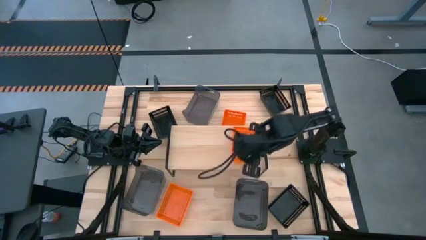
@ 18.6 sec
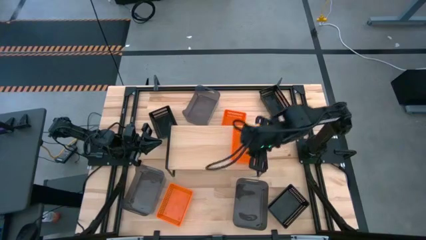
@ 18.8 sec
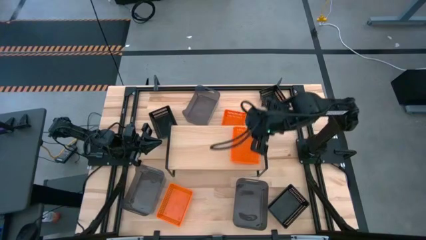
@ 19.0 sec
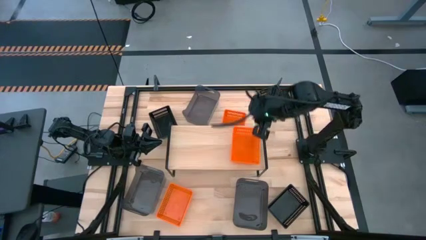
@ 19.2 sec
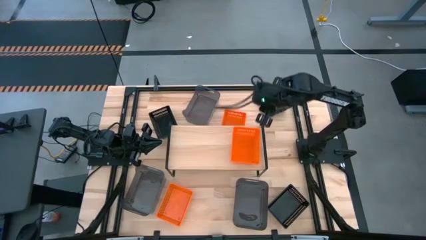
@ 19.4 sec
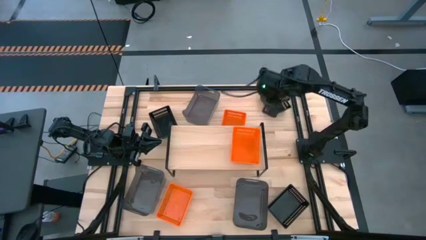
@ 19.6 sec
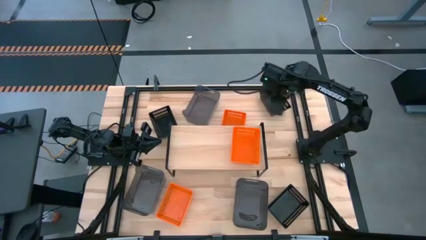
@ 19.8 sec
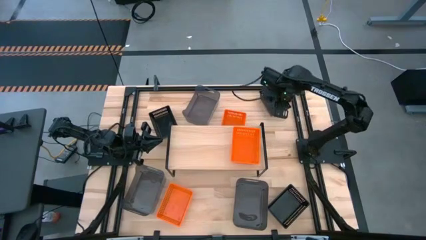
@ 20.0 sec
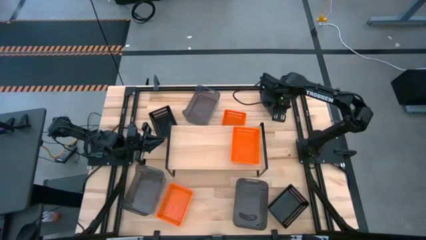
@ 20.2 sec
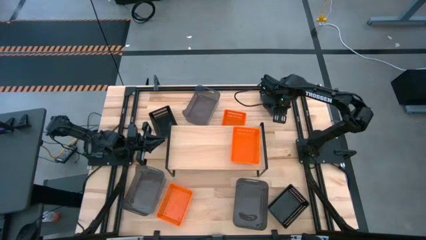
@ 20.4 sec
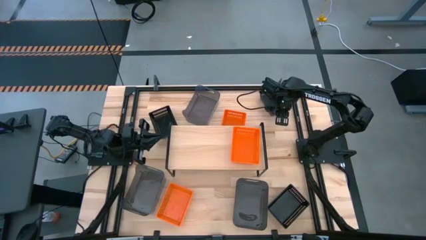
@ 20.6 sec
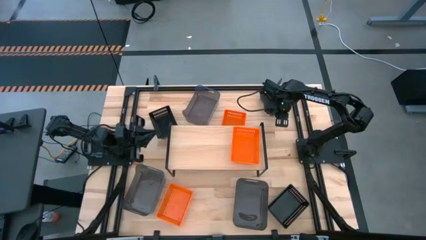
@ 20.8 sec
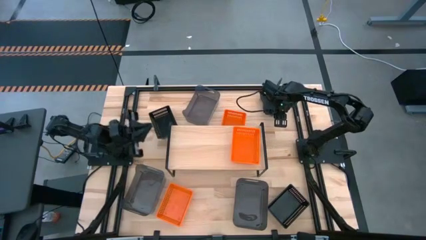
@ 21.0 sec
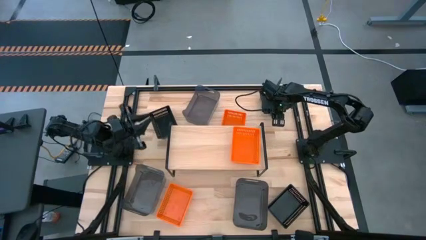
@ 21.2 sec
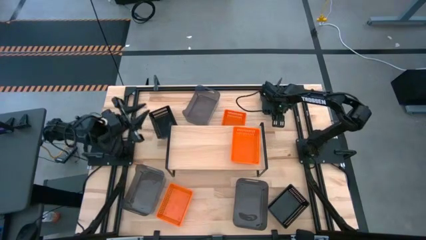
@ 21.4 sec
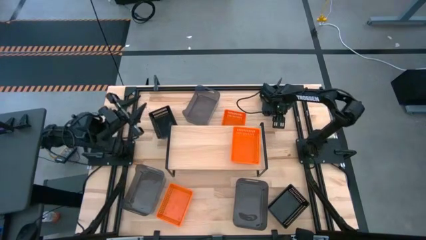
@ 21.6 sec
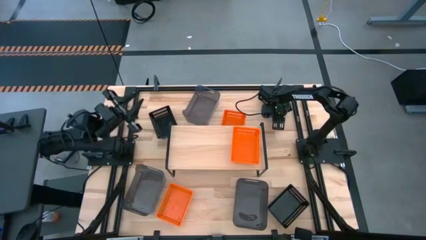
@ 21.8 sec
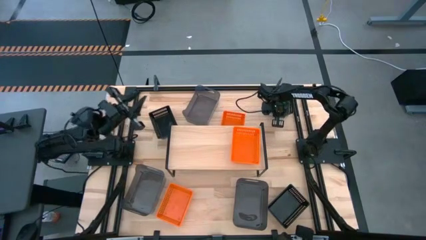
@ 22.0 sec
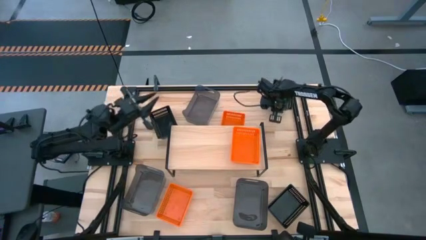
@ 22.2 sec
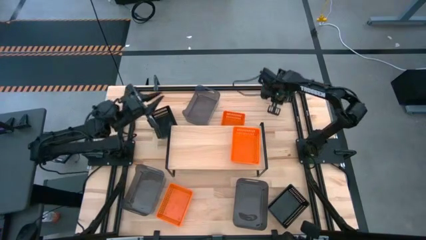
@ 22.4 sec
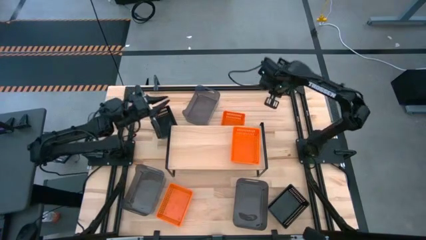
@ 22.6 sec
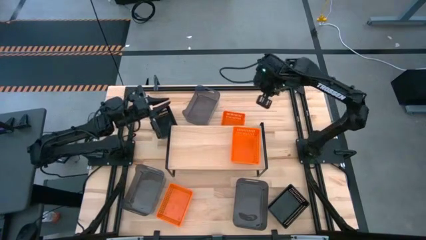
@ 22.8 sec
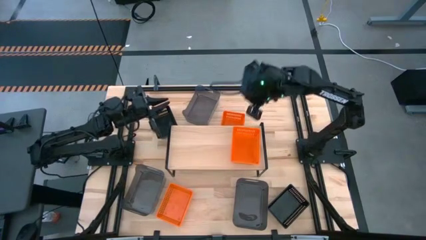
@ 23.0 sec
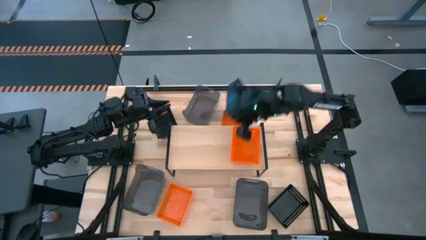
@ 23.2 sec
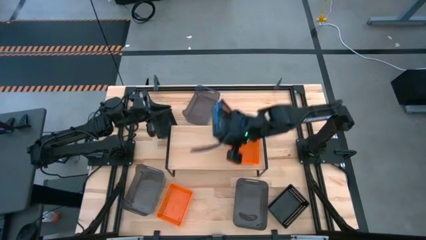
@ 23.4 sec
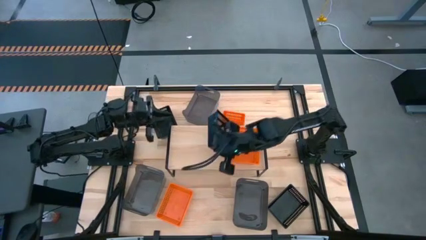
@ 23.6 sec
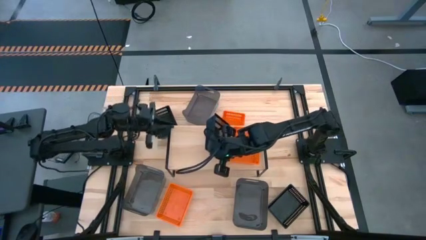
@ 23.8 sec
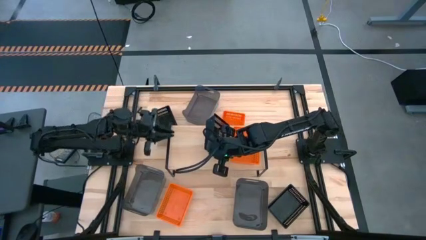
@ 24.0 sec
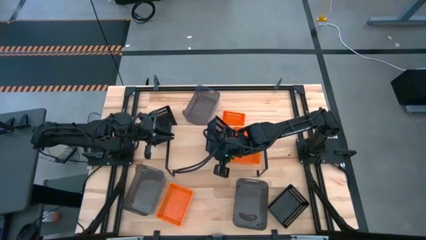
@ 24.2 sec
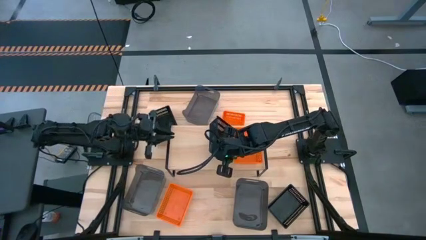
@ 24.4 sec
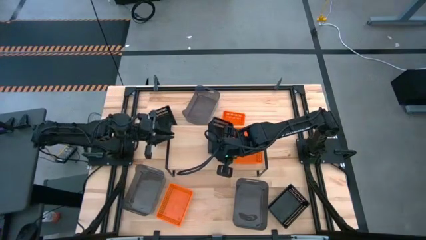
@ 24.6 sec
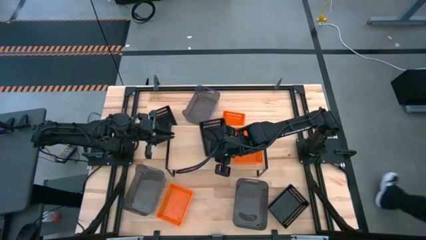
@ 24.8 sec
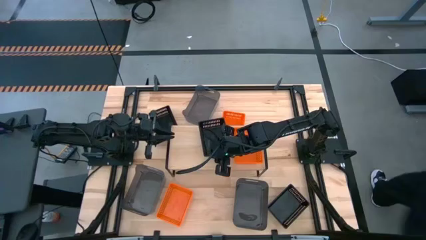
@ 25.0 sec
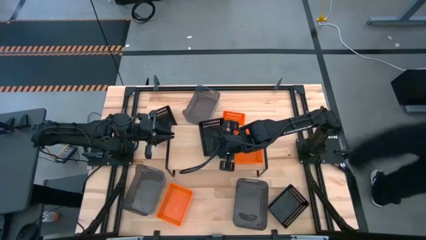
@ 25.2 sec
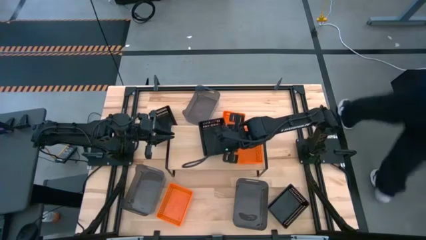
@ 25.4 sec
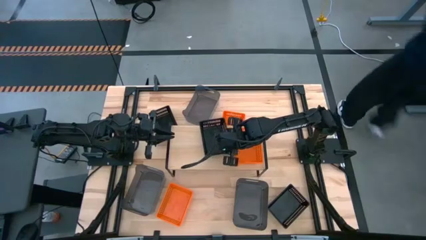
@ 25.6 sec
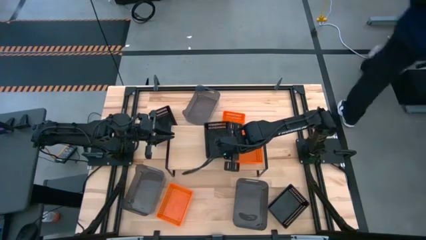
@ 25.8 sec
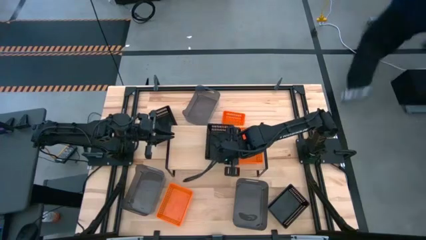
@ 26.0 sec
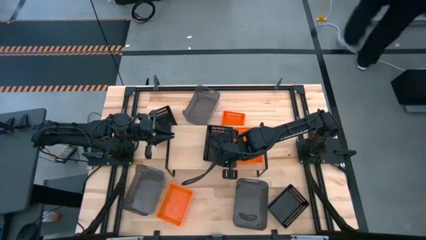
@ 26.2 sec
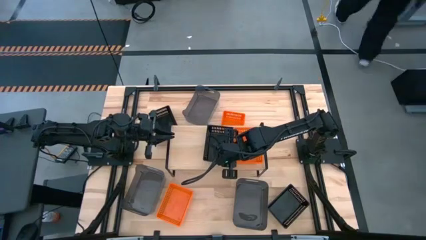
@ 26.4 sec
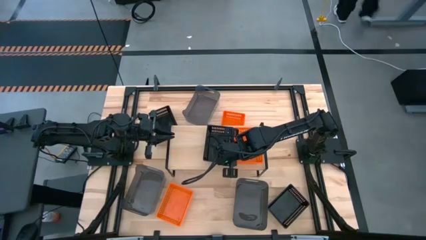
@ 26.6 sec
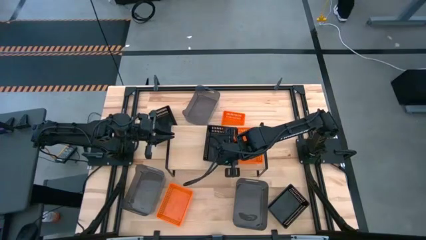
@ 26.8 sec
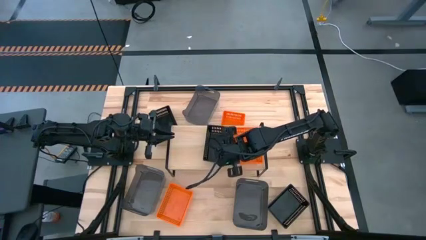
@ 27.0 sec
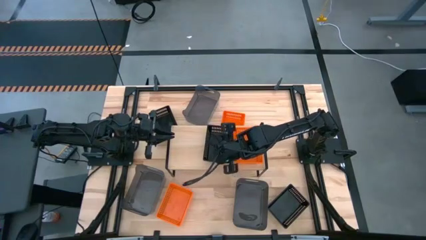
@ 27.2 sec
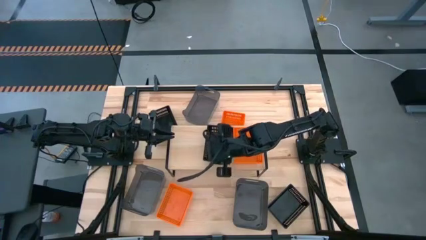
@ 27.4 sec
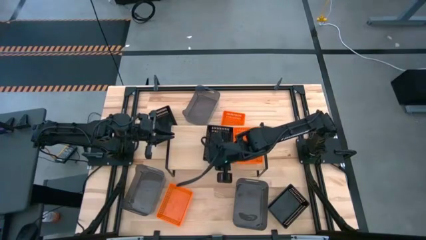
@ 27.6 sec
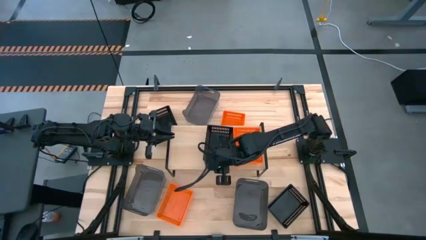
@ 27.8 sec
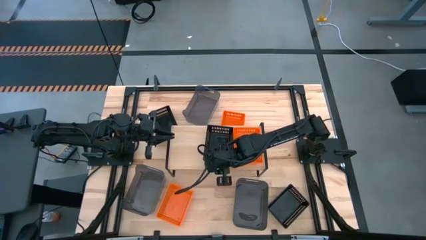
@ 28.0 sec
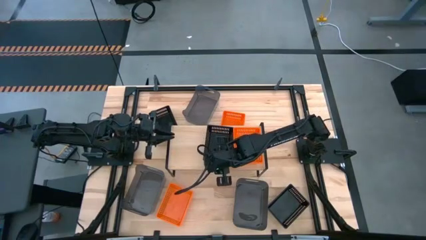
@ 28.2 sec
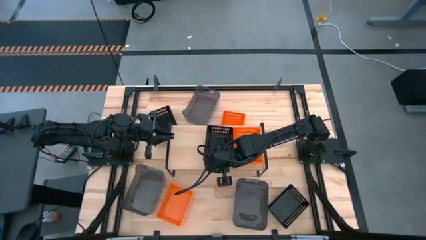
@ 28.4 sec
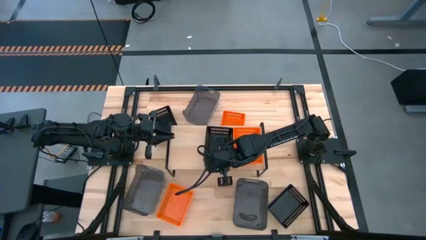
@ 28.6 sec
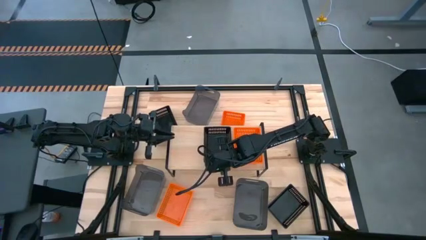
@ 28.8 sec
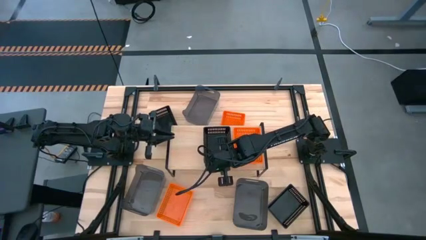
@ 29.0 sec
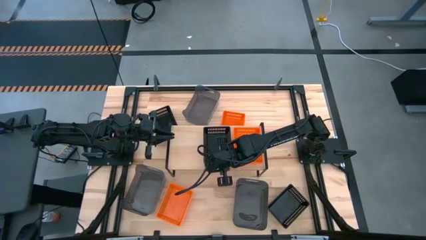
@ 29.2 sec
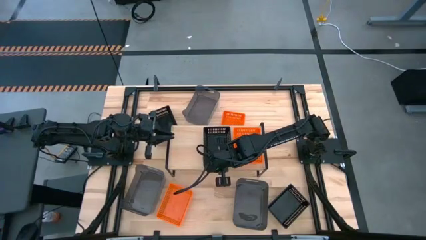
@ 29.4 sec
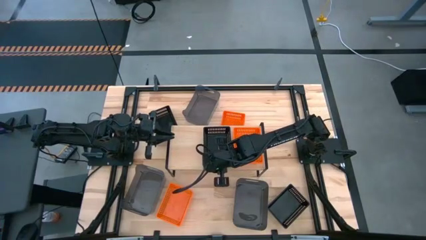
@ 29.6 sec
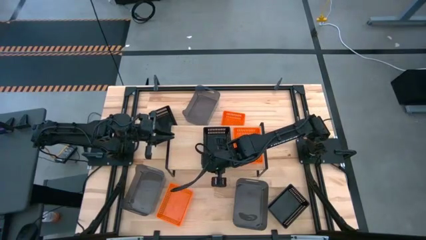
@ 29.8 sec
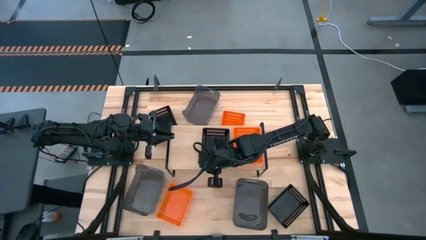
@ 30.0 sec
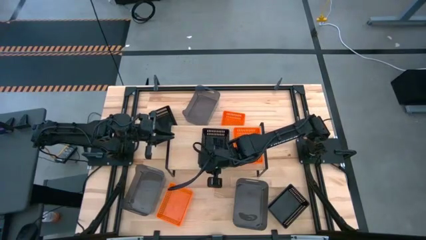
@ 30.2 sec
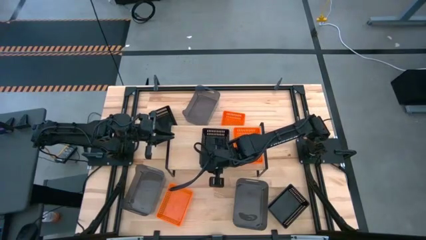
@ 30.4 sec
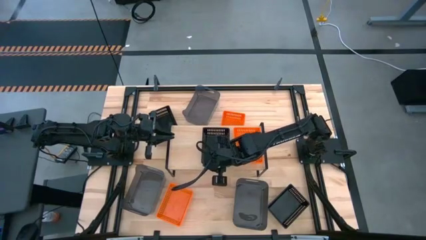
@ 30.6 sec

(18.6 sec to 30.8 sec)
Task: Stack baskets on shelf by color
Put the top right black bin on the shelf

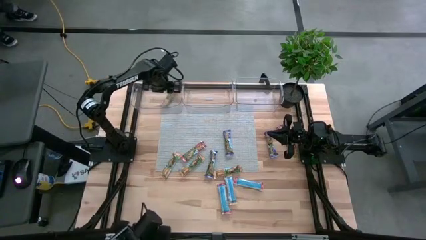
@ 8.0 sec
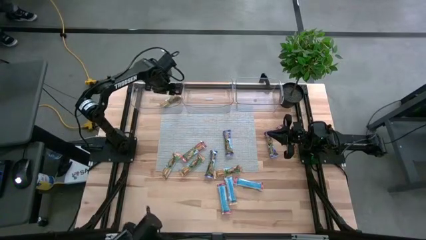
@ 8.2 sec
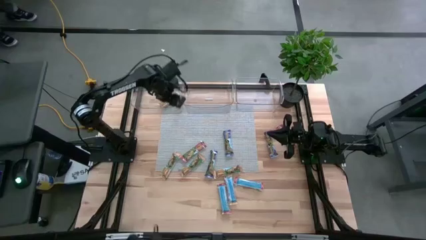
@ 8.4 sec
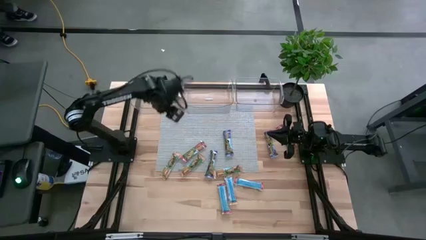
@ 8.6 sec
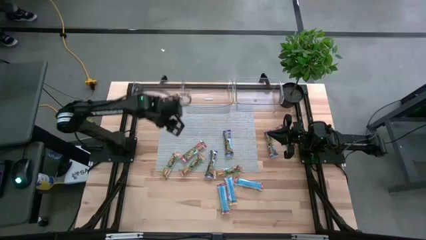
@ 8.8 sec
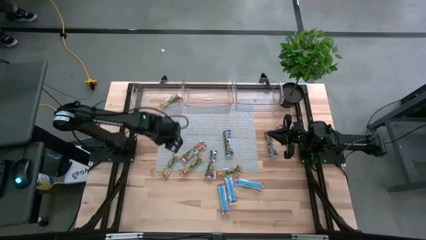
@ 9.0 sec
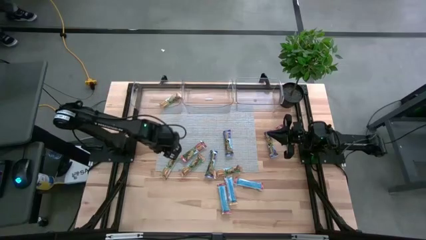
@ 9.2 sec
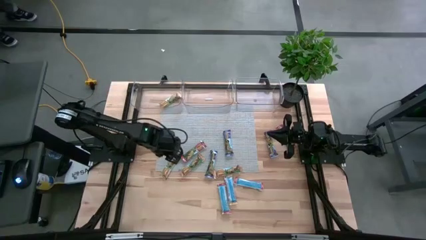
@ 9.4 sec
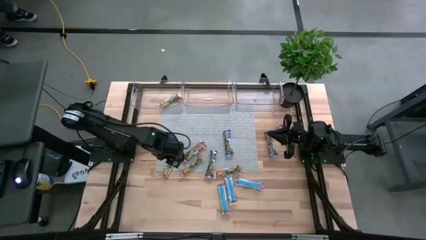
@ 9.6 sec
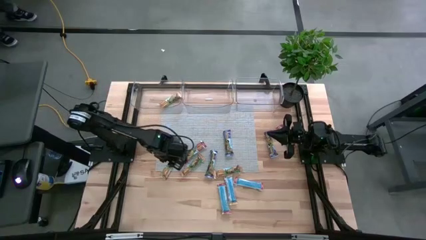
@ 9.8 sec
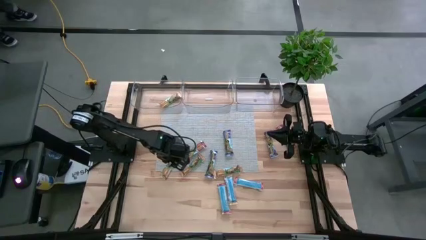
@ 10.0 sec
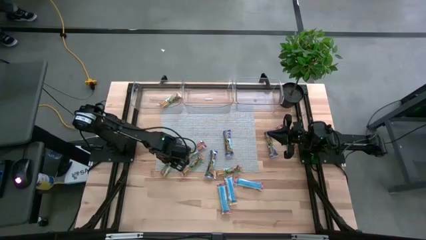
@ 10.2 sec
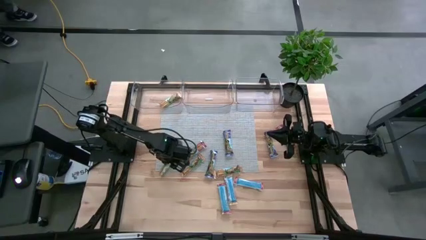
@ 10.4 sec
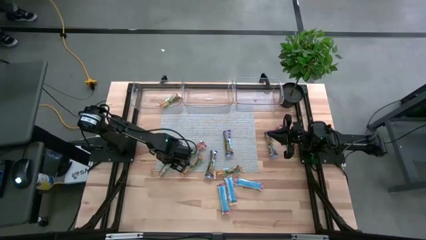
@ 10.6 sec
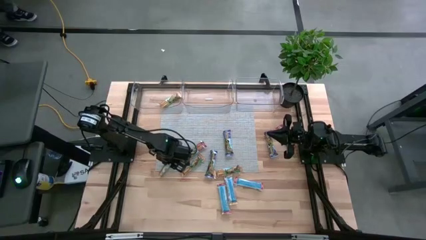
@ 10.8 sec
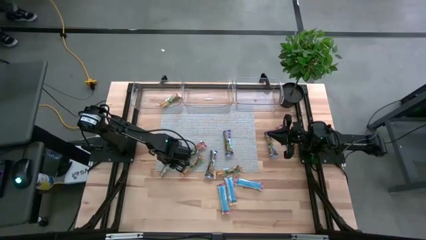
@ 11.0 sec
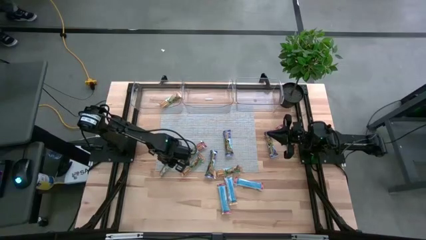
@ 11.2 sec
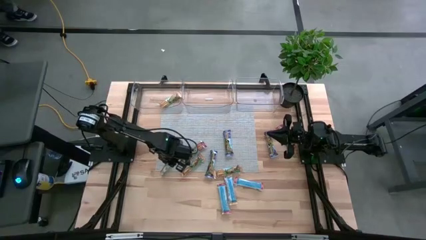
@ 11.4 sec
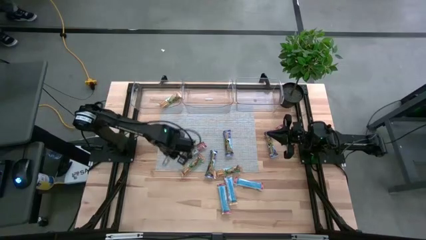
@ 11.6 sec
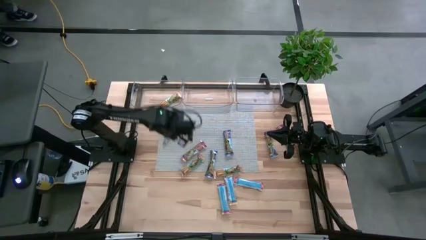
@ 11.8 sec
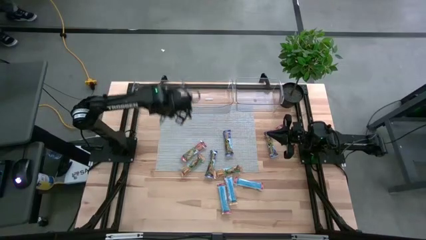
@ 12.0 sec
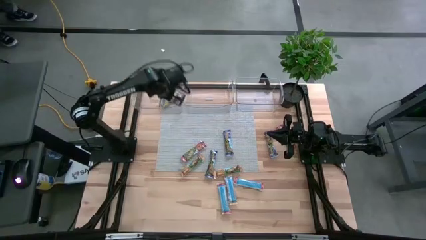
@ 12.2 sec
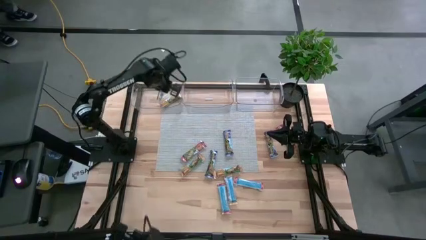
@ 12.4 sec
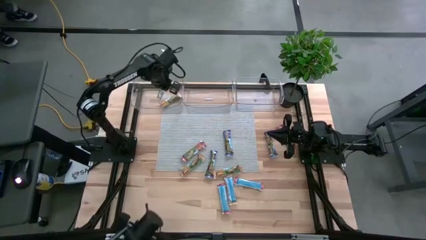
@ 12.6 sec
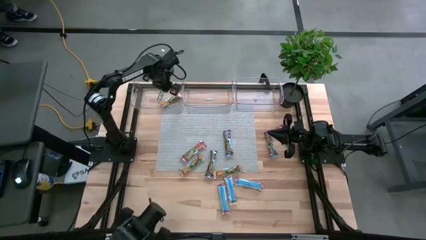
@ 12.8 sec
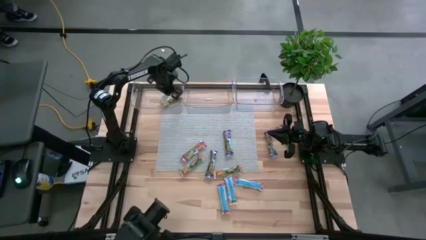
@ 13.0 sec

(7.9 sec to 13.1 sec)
Task: Pick and place Granola Bars by type
Put the yellow granola bar into the left transparent bin
